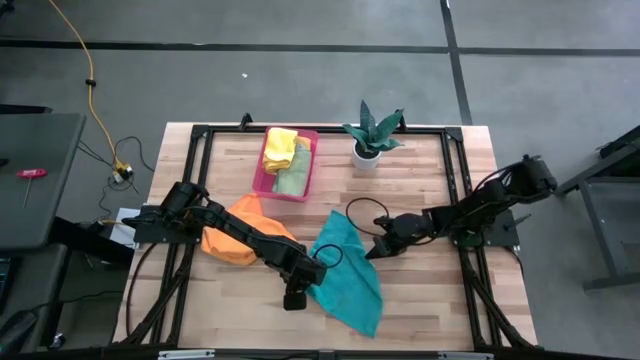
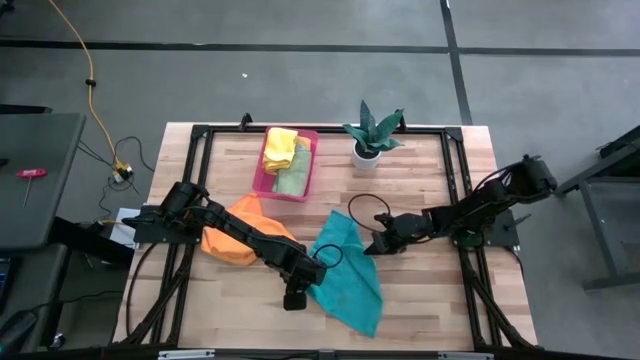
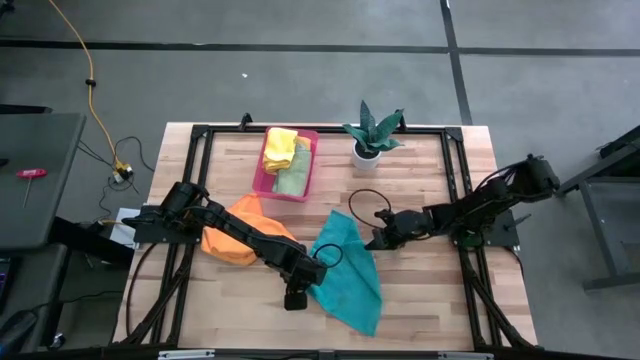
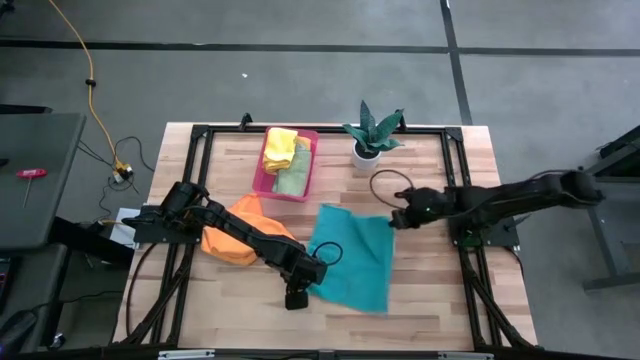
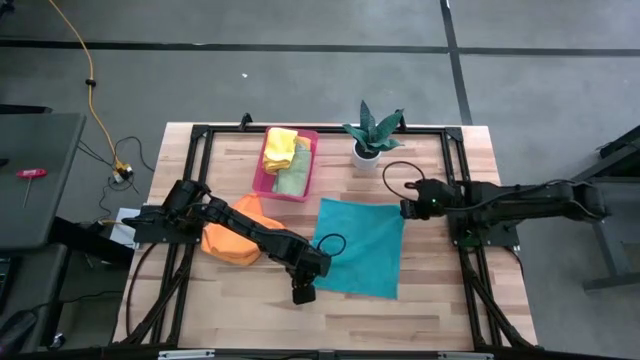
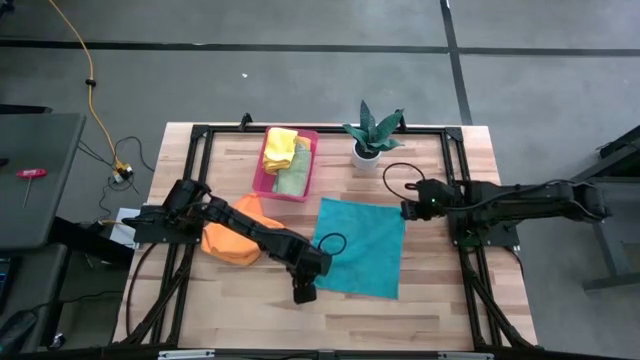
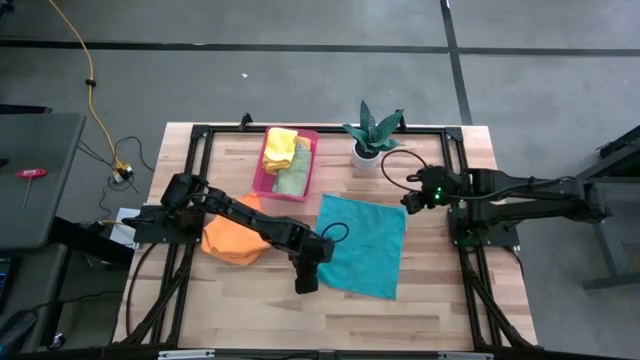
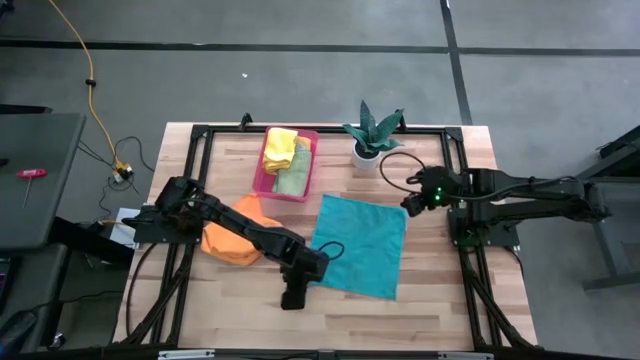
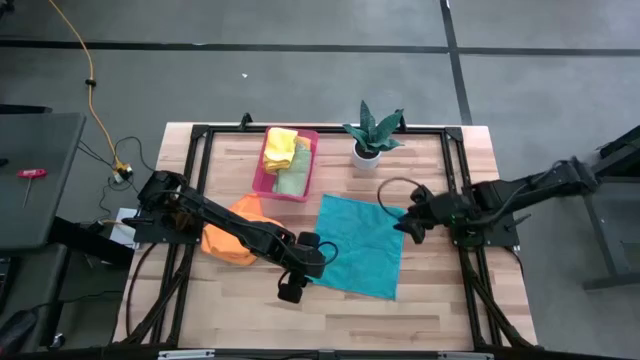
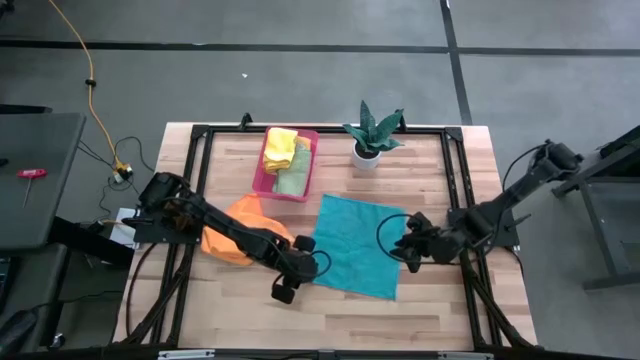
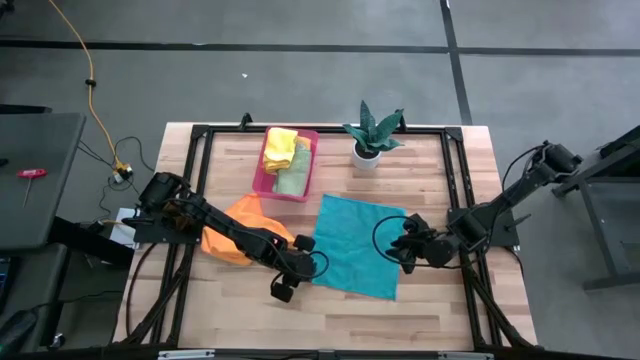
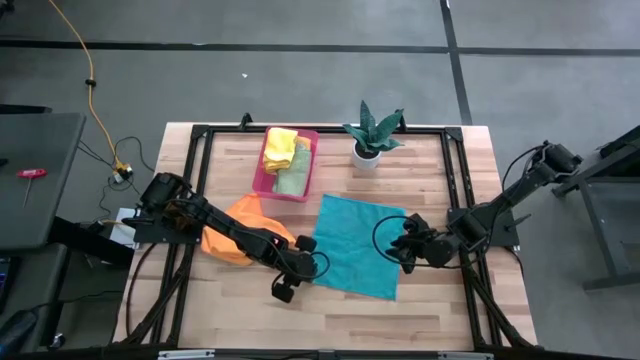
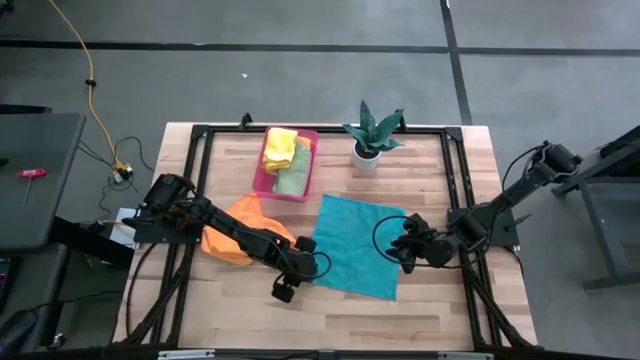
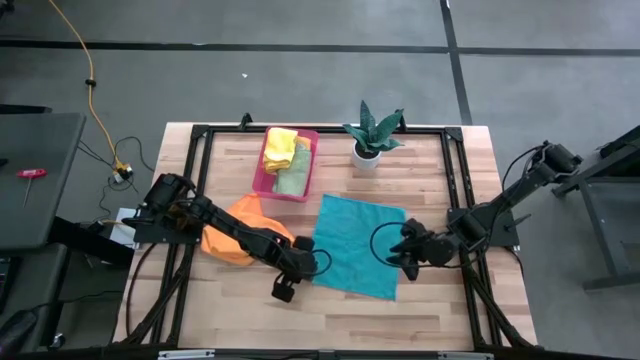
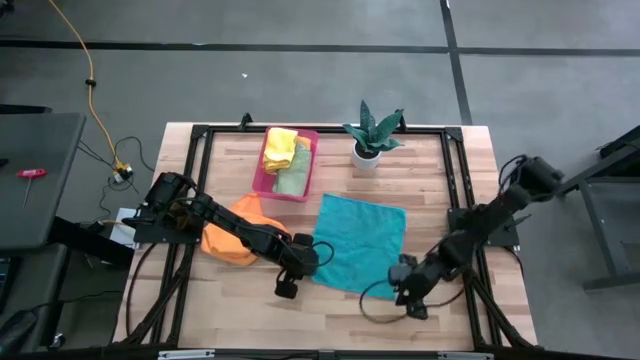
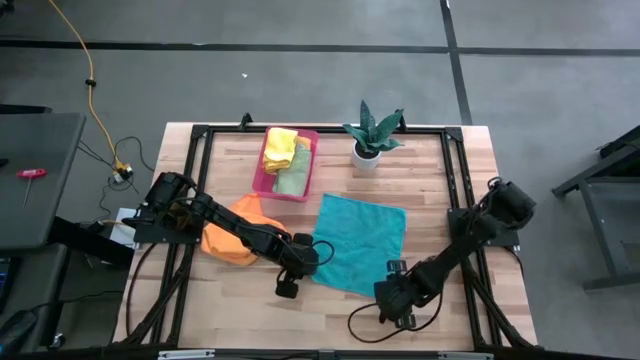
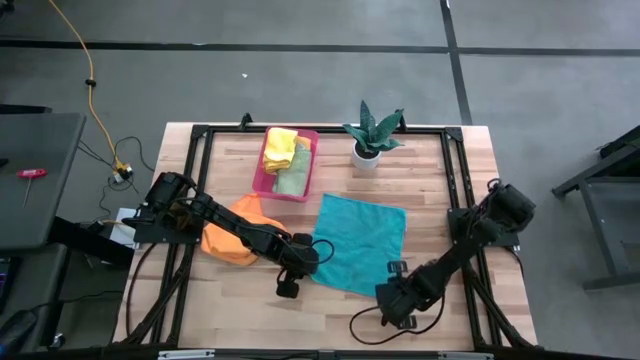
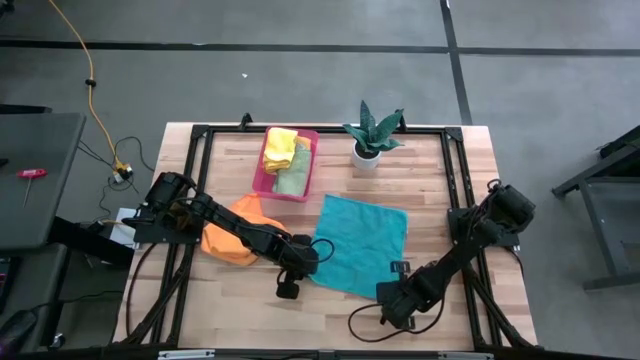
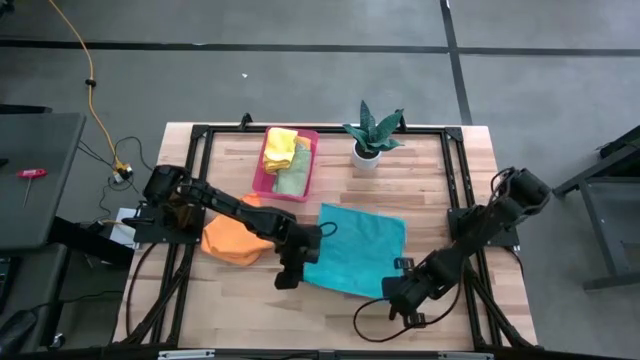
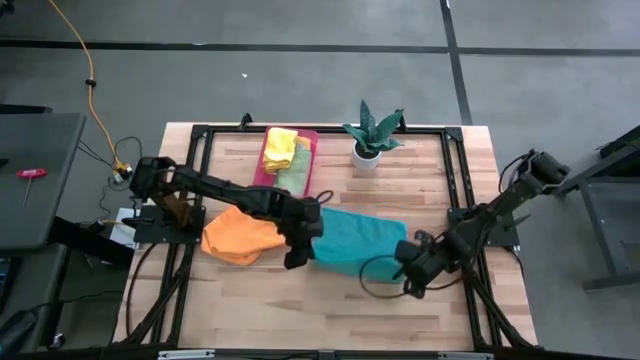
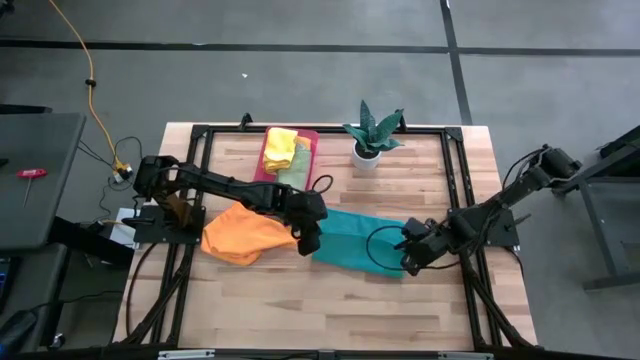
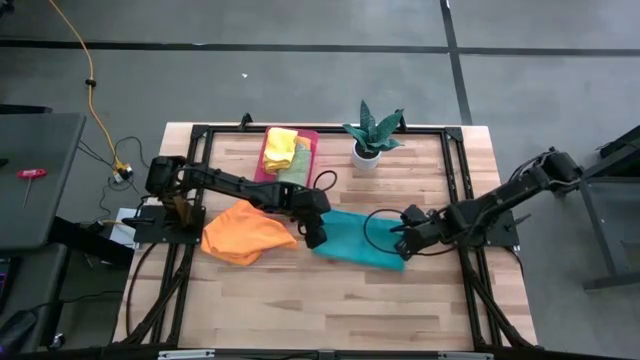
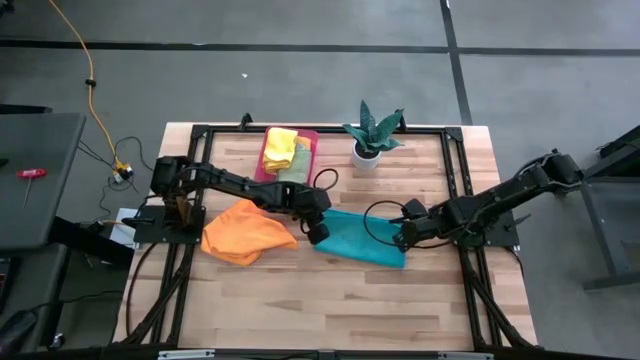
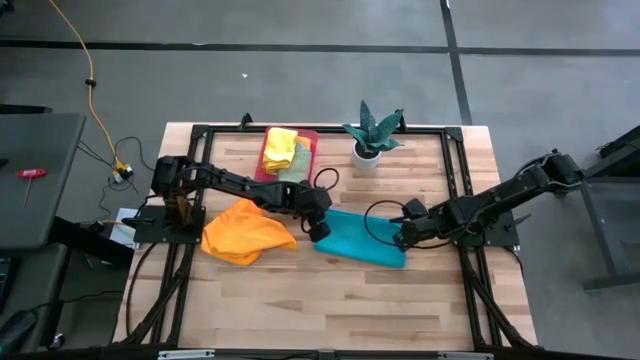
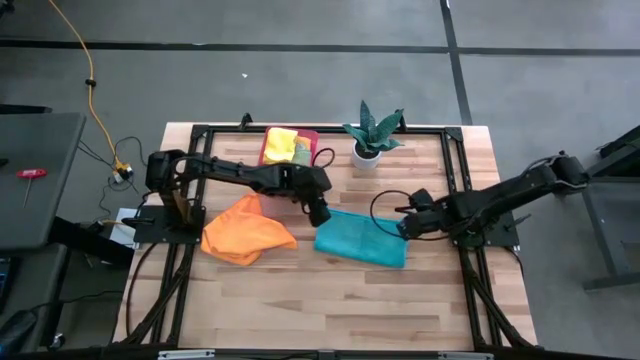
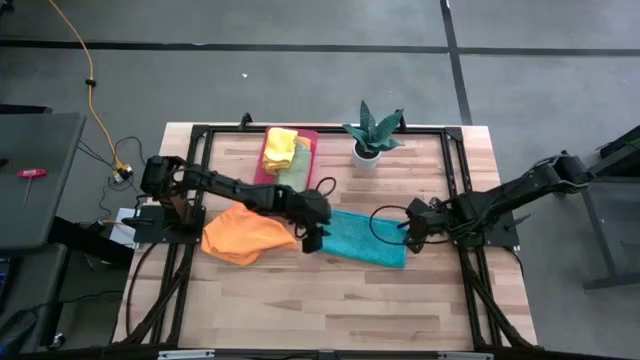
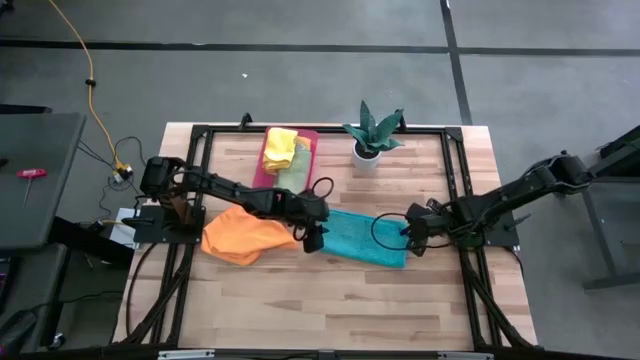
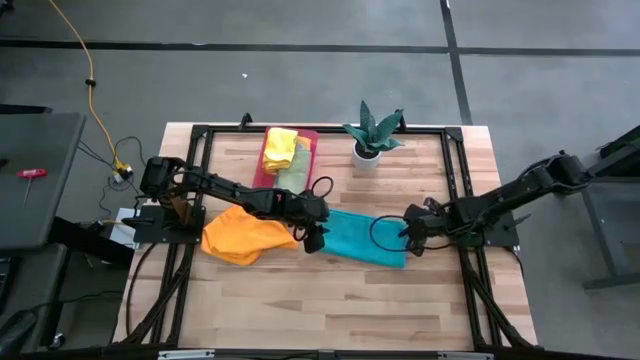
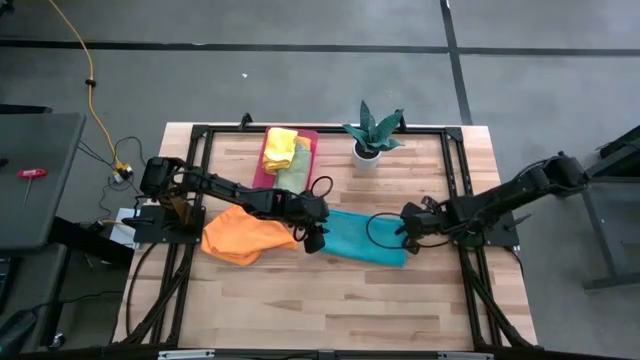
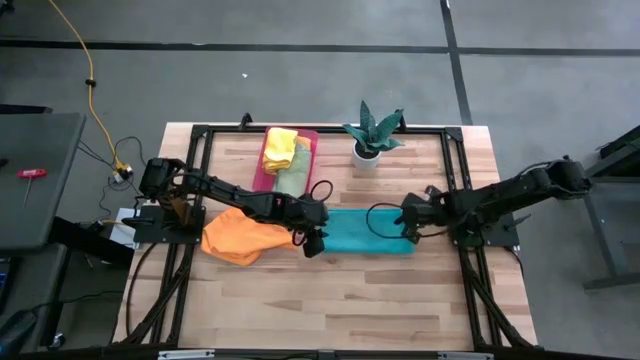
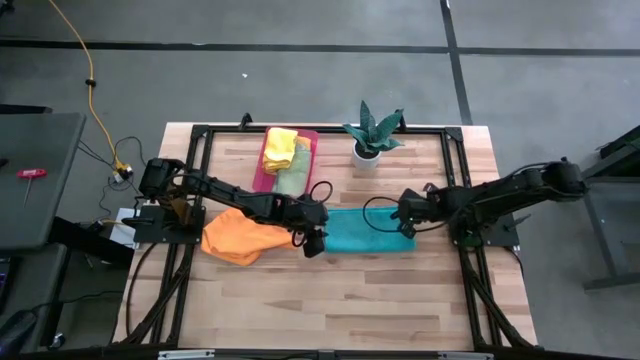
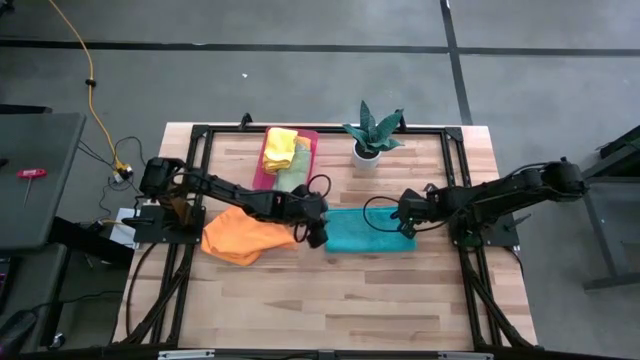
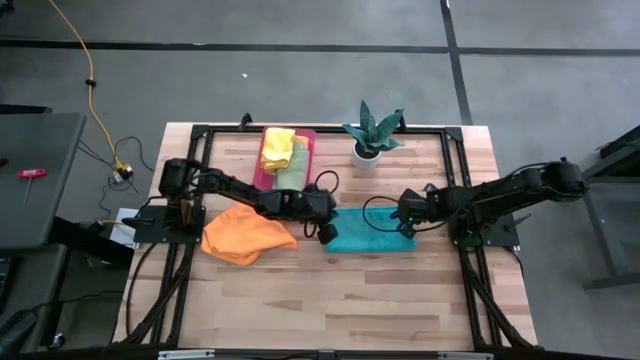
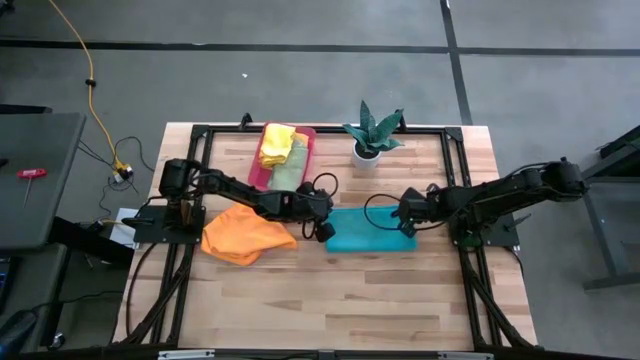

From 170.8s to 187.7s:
Task: Fold microfiber towels
Fold the blue microfiber cloth

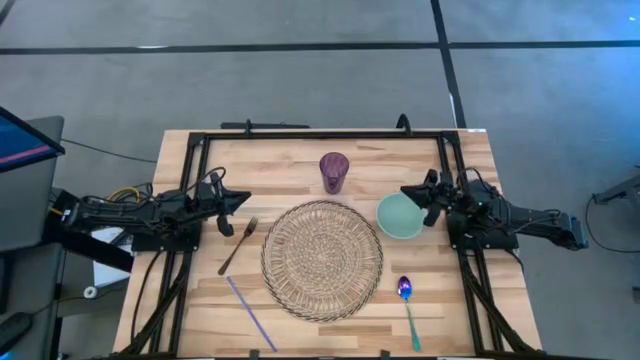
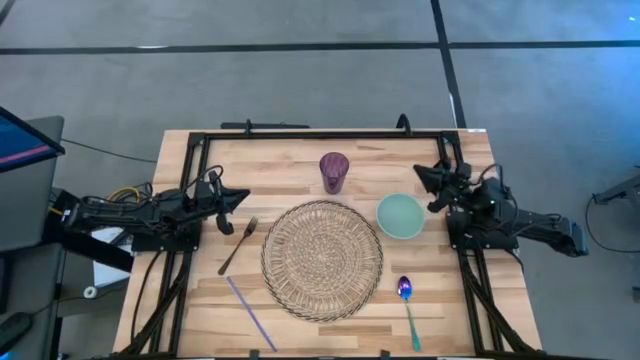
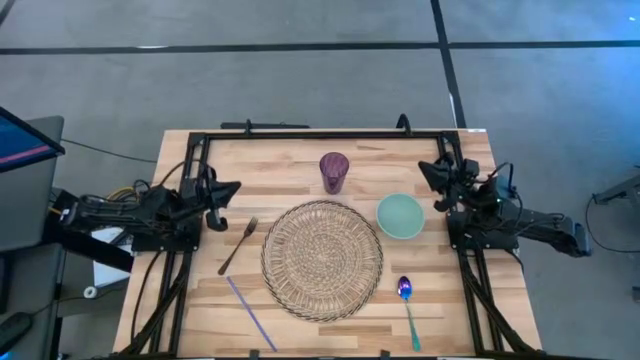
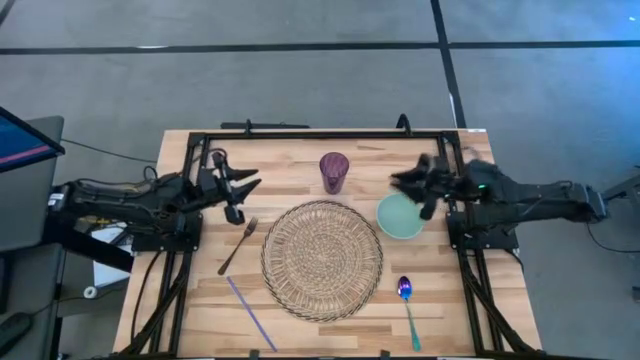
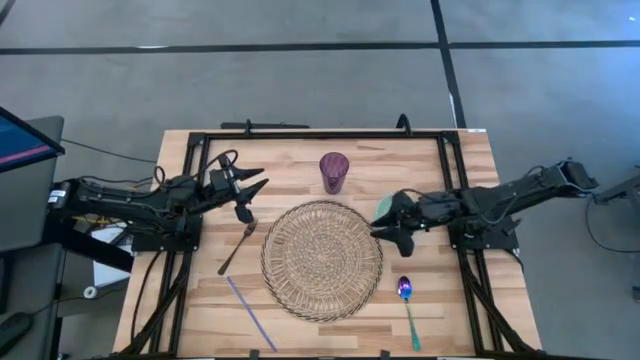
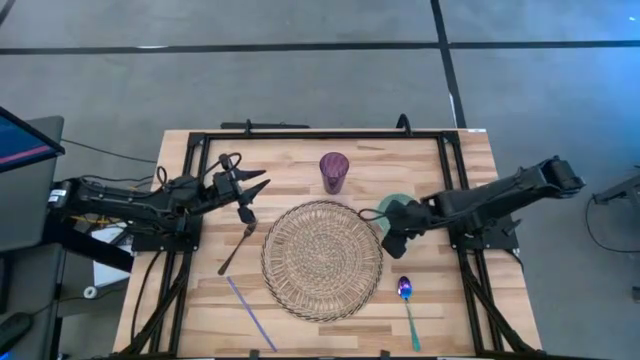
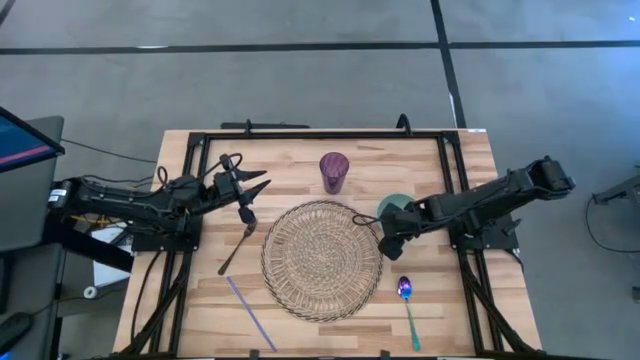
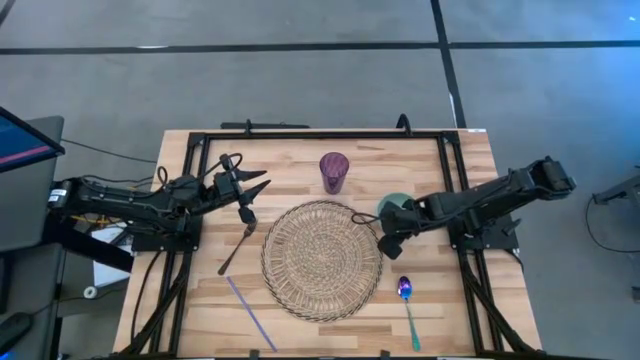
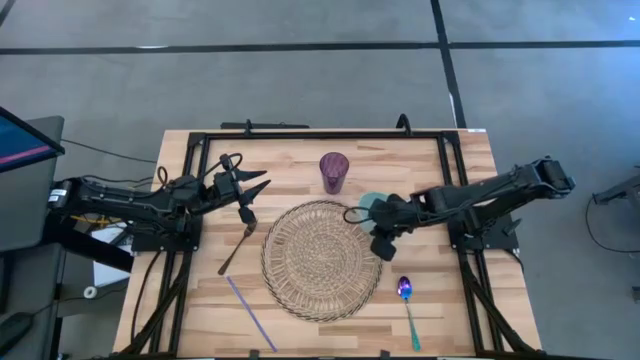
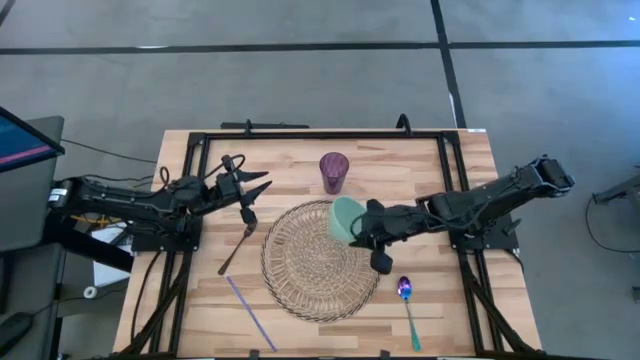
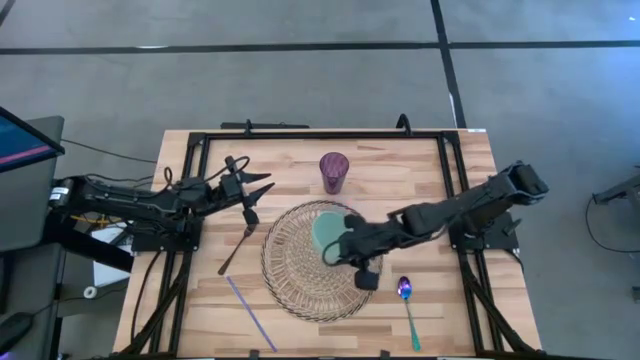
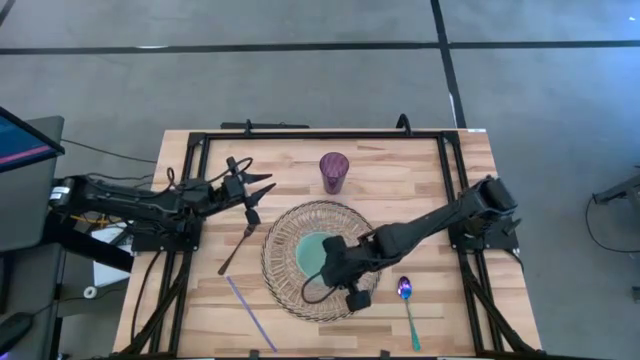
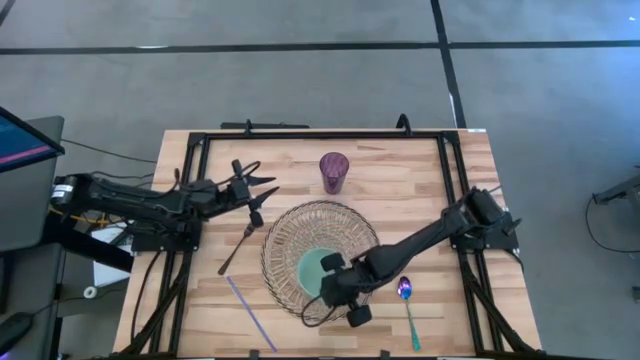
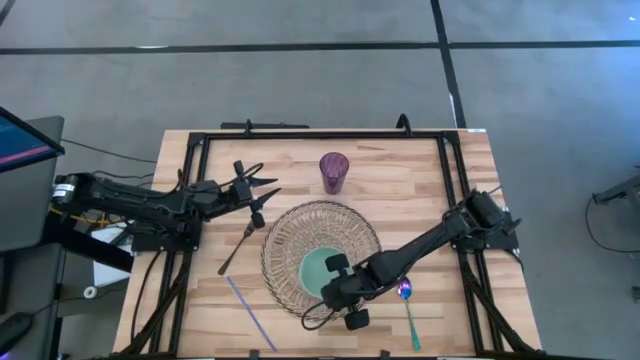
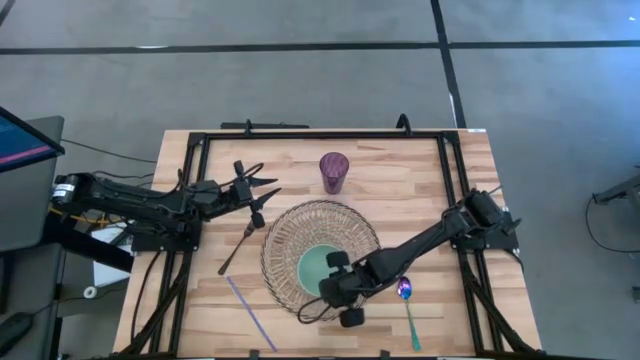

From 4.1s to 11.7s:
Task: Pick & Place Utensil
Put the green bowl on the brown mat
